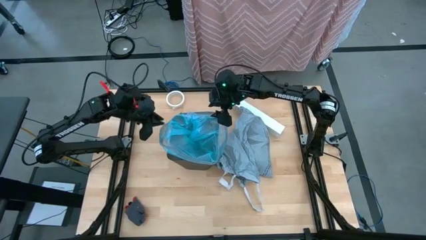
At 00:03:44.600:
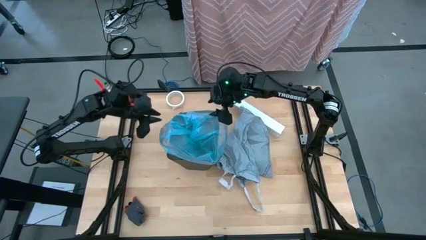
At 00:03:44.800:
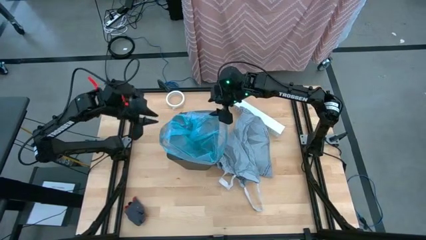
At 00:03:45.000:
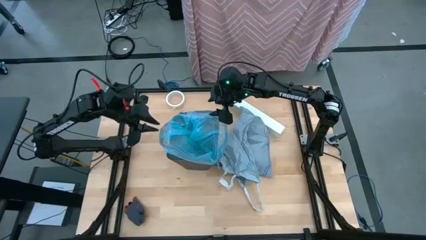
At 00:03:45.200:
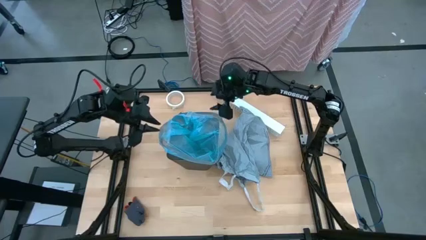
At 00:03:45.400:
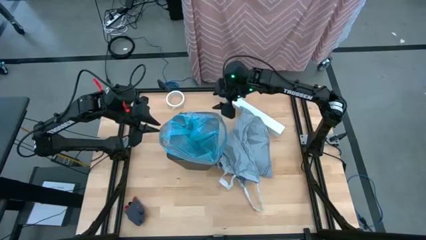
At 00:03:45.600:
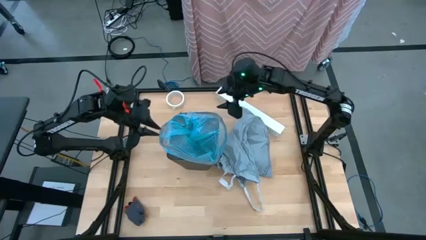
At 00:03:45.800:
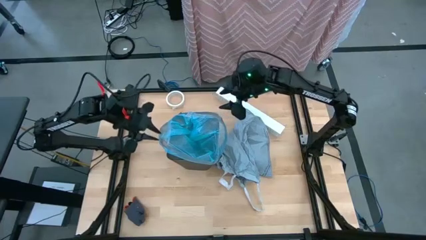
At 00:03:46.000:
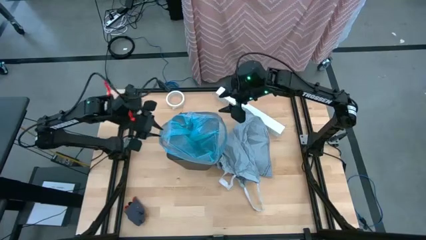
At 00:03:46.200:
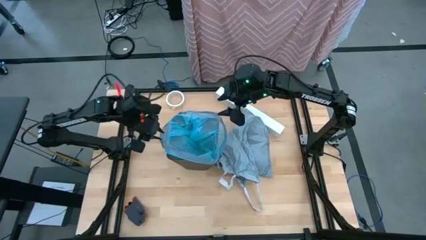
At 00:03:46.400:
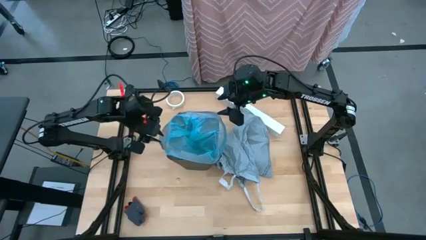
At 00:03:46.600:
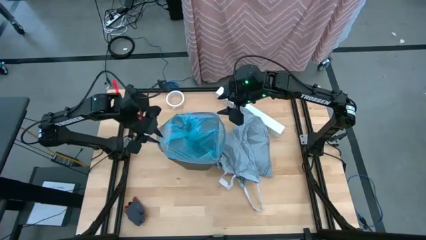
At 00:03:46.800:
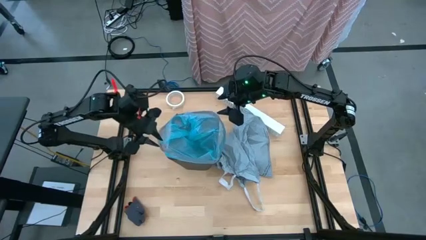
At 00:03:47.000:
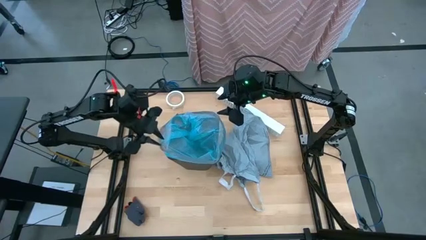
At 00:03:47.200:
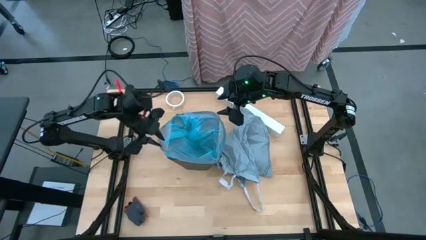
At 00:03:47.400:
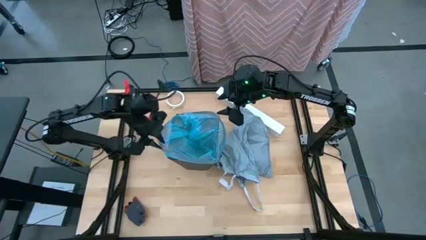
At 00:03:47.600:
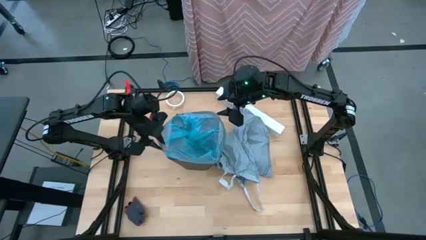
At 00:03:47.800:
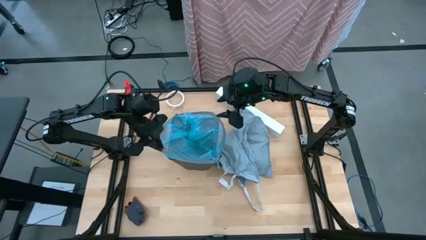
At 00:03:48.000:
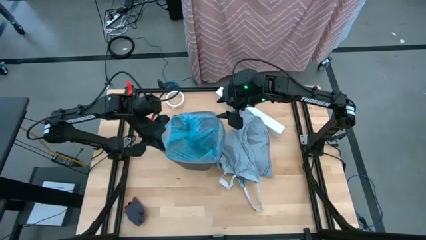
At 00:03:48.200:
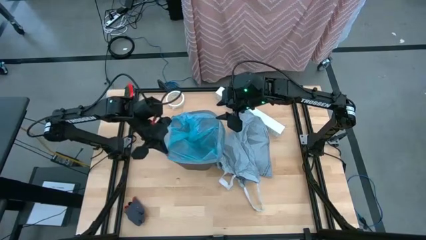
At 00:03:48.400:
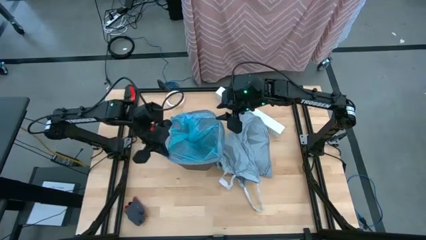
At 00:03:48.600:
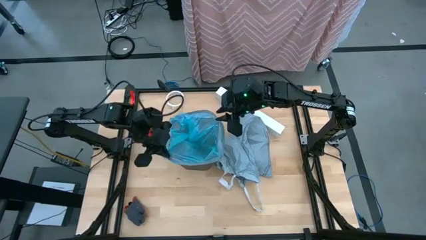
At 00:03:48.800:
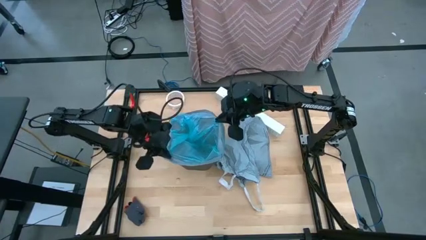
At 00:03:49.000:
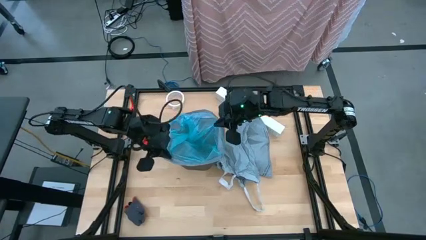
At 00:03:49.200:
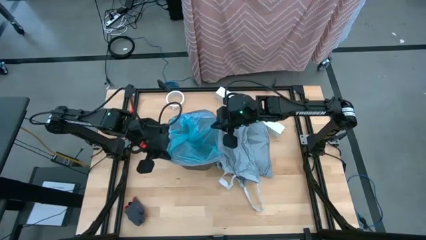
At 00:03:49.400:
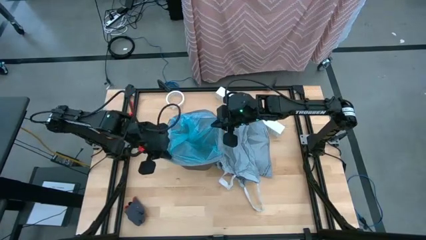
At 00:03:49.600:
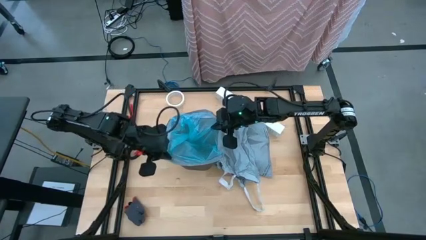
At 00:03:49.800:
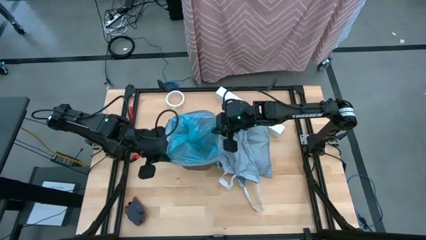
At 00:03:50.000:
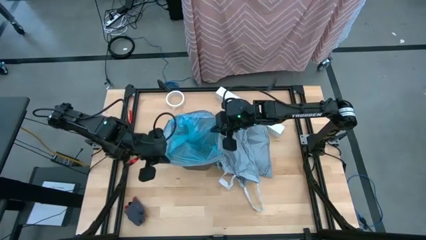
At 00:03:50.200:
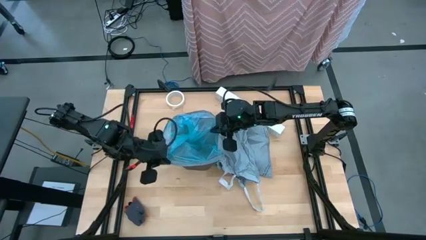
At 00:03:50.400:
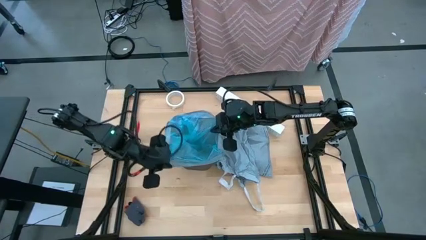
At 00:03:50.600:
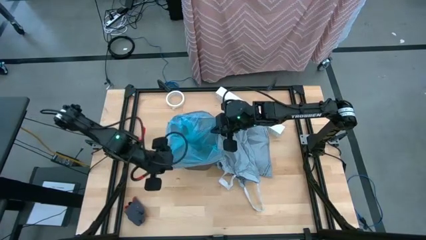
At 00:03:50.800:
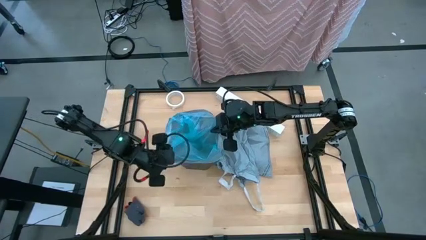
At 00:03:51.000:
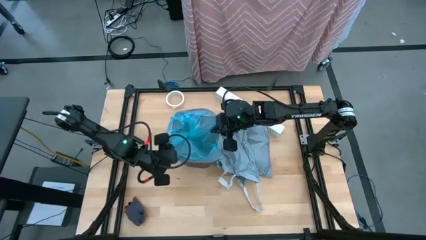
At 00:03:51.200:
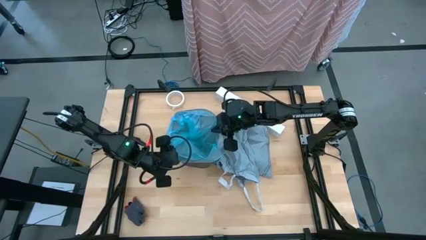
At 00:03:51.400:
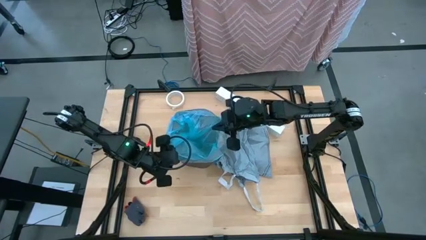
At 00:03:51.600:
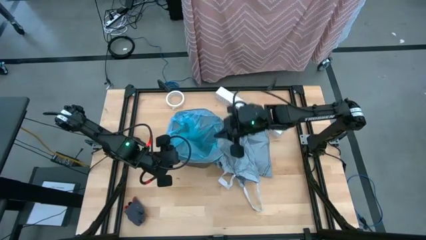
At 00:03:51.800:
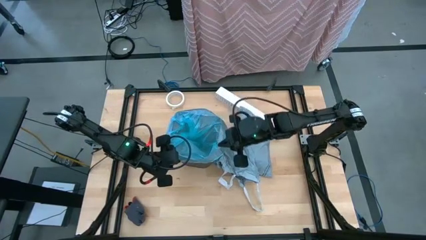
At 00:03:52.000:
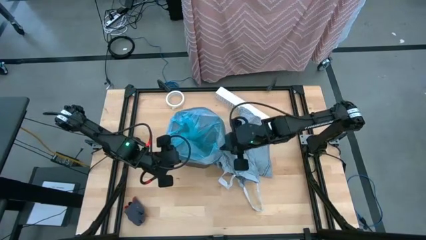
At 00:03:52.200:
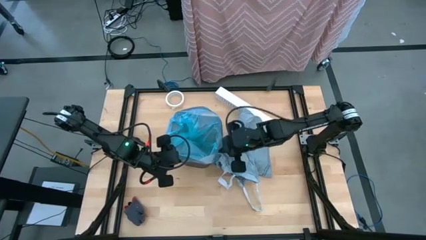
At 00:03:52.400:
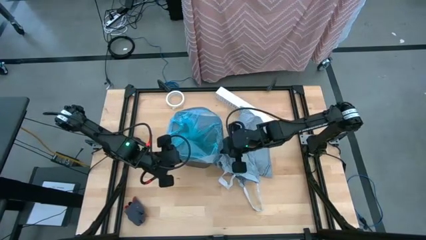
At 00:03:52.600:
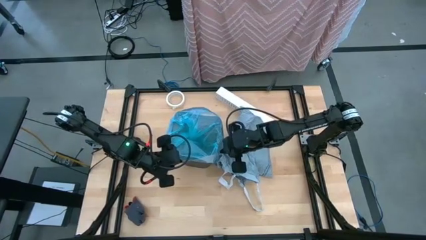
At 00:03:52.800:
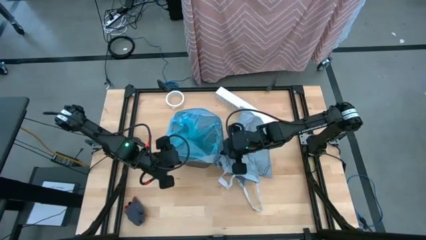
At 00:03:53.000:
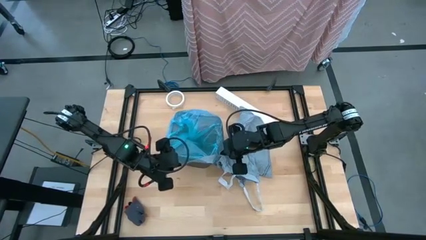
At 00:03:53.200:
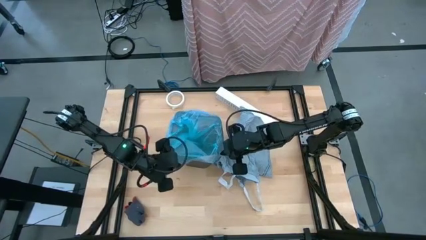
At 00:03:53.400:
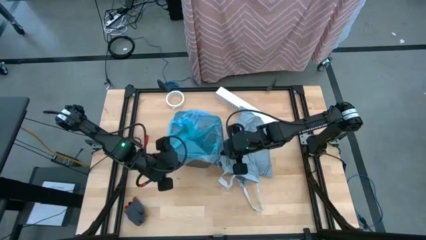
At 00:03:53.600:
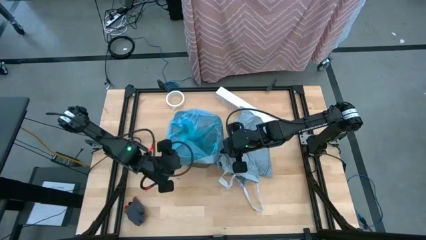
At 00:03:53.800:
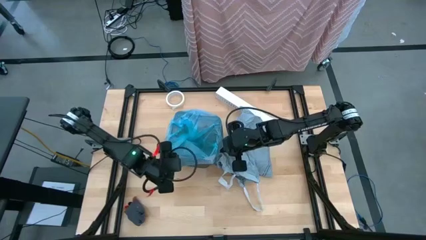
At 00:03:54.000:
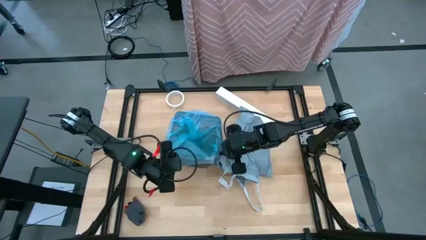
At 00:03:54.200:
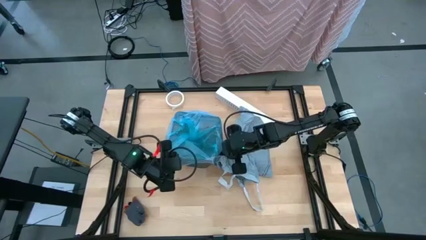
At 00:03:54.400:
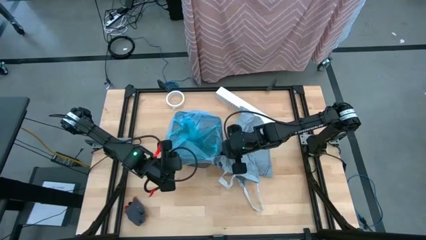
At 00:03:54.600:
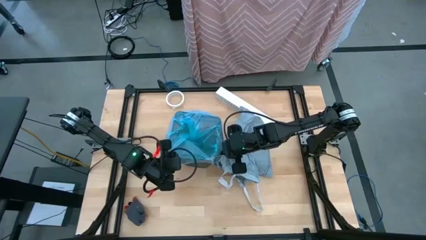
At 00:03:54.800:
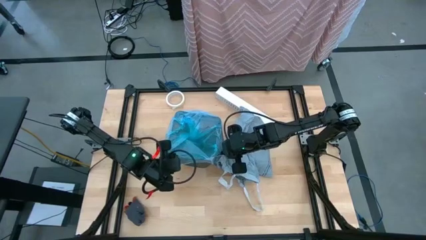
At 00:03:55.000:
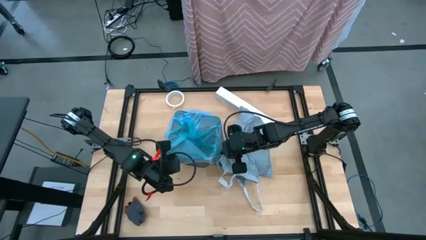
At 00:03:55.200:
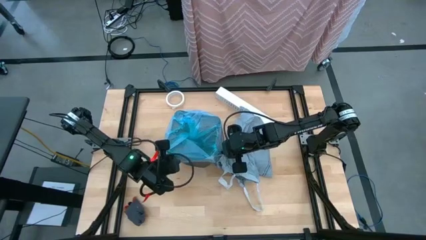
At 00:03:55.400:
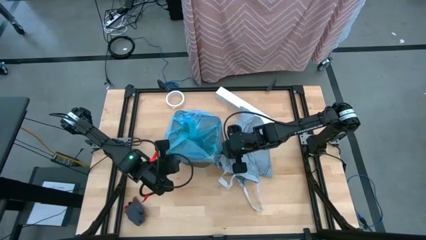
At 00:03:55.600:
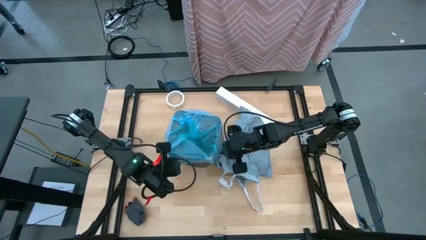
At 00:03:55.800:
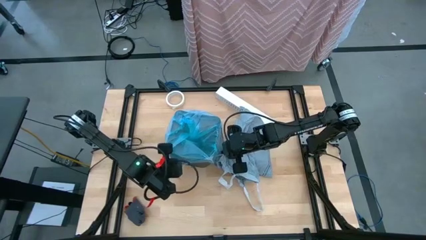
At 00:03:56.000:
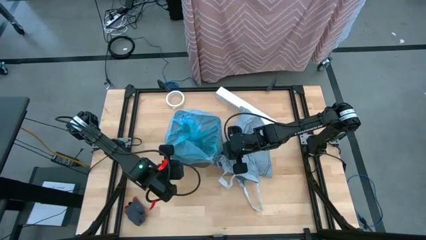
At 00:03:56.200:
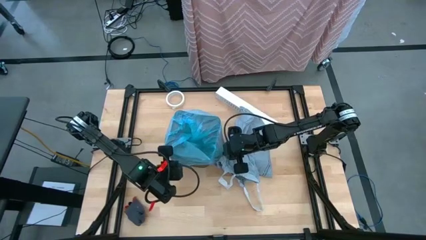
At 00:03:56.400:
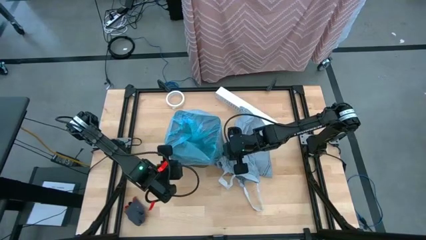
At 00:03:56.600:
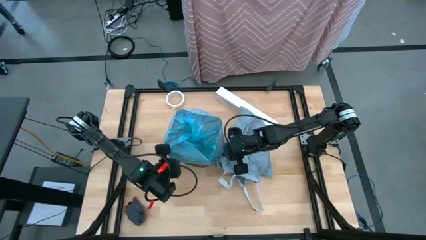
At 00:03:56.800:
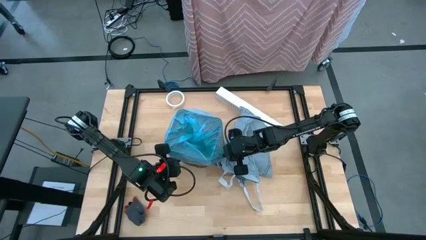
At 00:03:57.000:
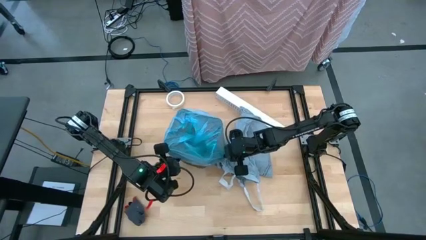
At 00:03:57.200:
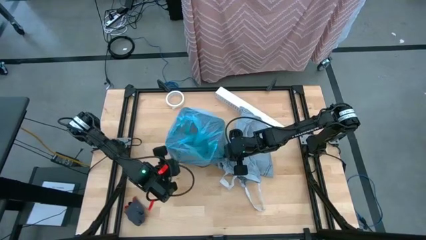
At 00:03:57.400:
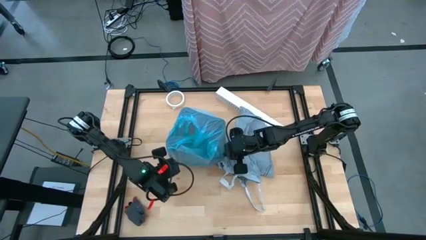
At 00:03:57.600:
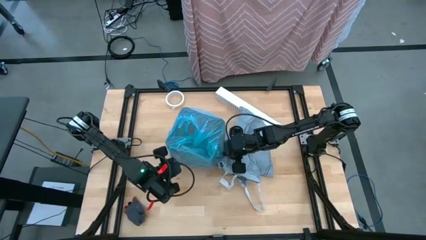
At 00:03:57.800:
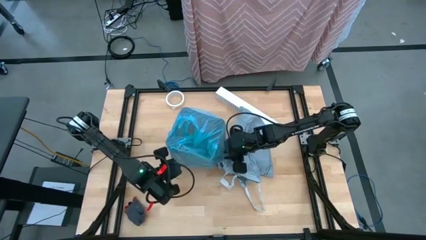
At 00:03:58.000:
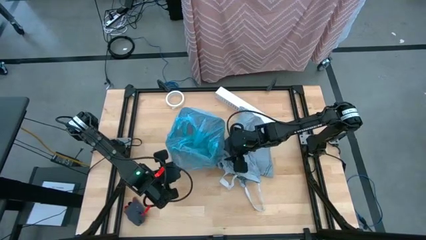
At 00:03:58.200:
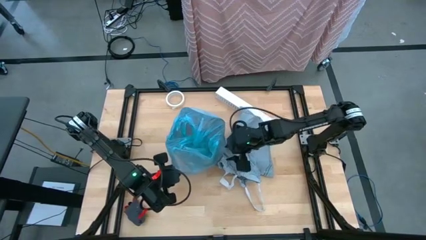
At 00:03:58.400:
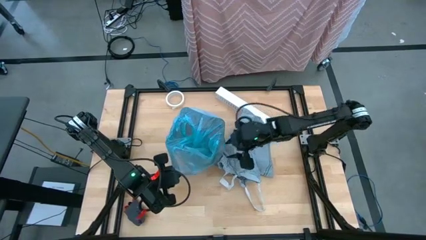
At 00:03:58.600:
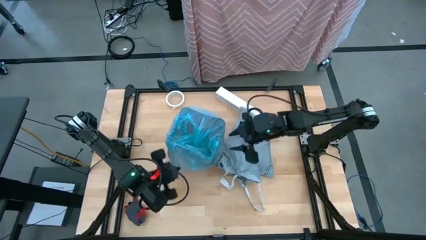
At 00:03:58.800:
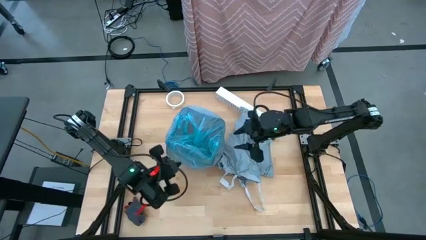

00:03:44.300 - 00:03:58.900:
Task: place trash/remove bag and relplace
Insert a new trash bag into the trash bin

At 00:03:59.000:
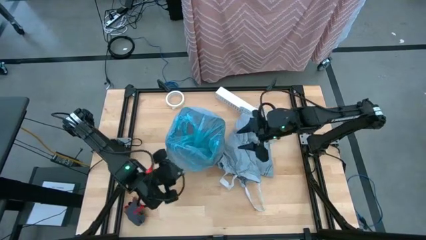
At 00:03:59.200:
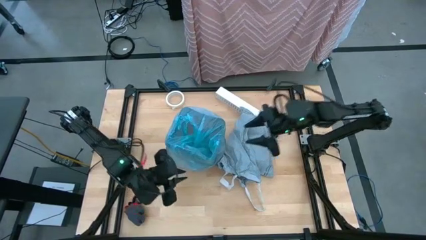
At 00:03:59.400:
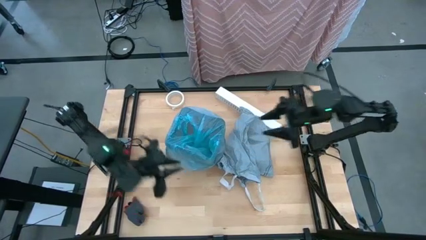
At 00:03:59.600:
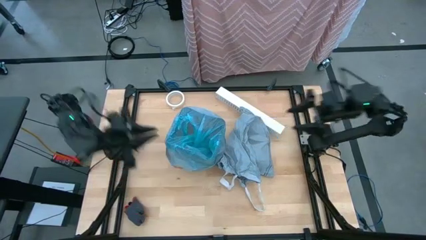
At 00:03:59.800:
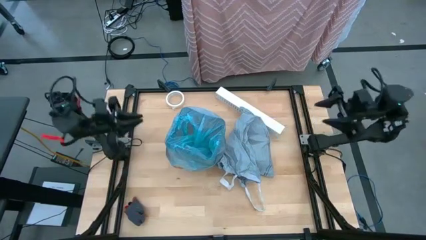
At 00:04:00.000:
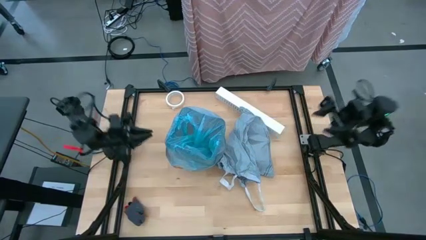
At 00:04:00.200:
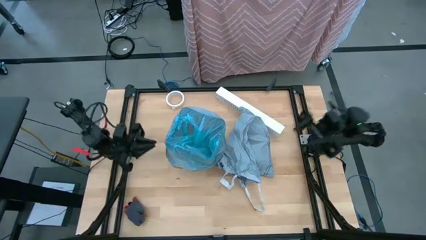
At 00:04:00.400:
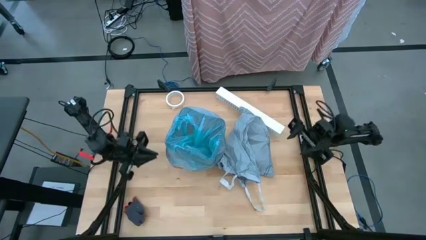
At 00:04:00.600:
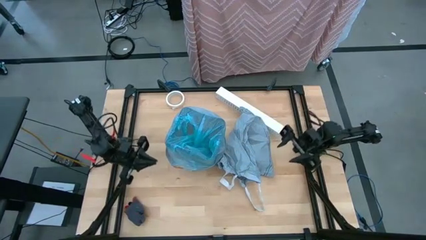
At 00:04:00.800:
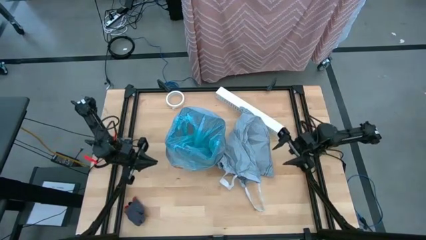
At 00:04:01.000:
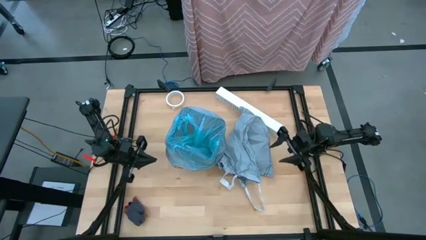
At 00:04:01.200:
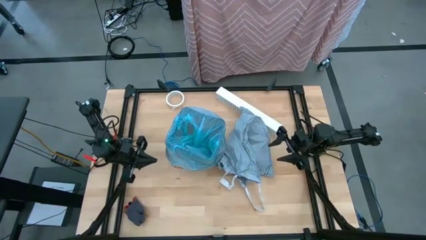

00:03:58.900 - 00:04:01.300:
Return to Home Position
